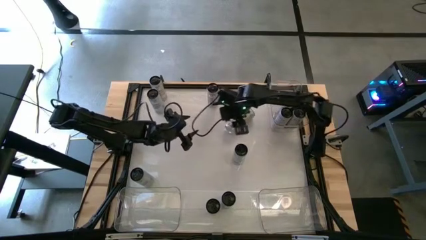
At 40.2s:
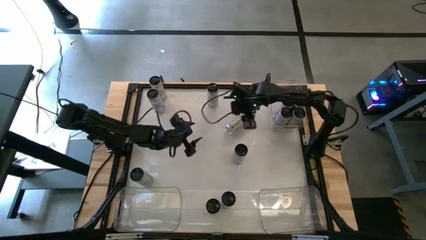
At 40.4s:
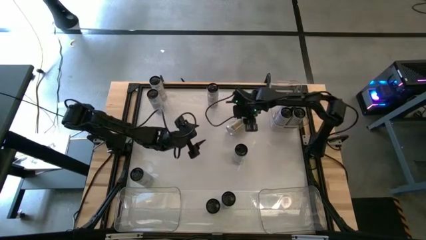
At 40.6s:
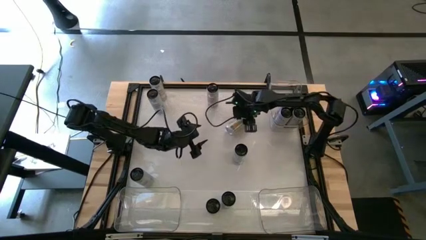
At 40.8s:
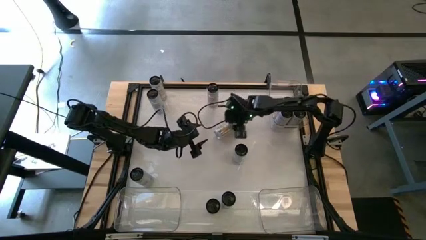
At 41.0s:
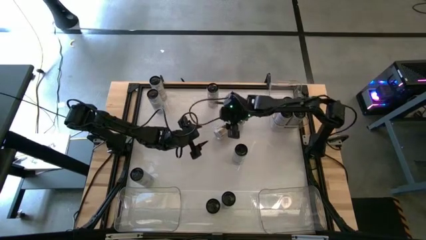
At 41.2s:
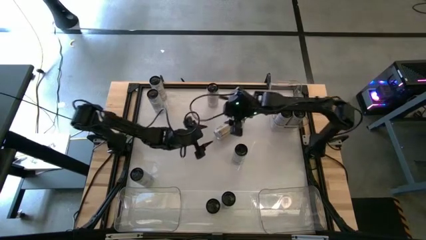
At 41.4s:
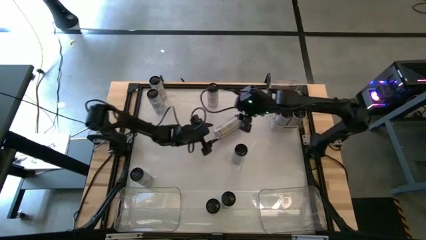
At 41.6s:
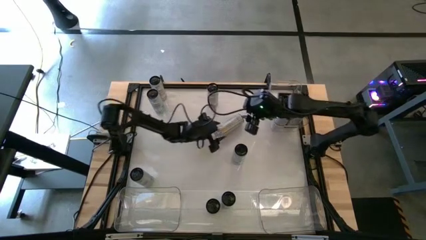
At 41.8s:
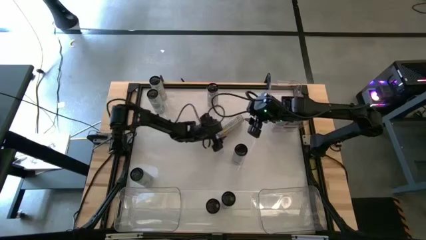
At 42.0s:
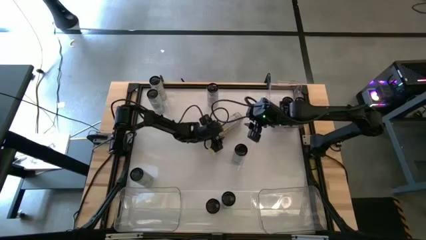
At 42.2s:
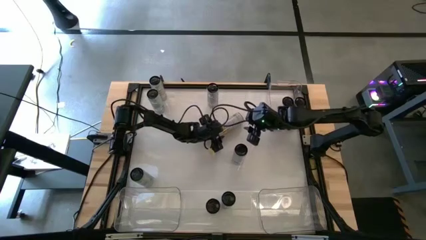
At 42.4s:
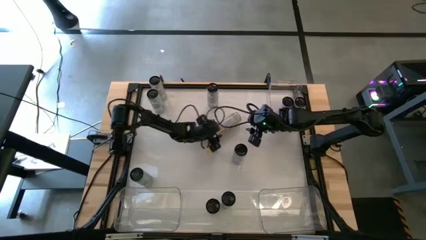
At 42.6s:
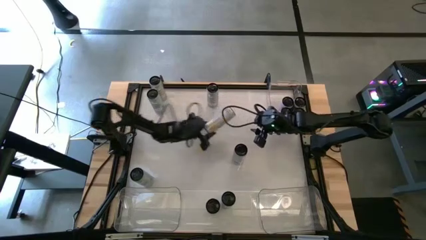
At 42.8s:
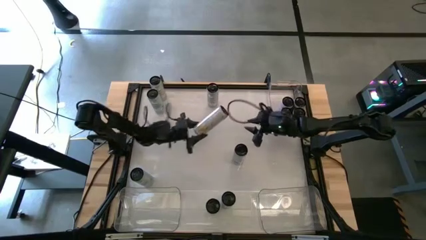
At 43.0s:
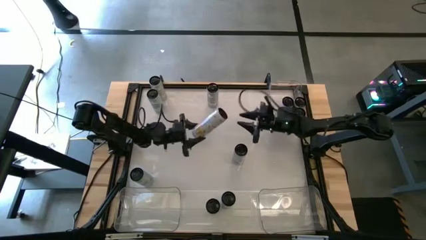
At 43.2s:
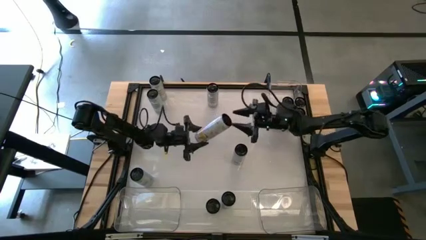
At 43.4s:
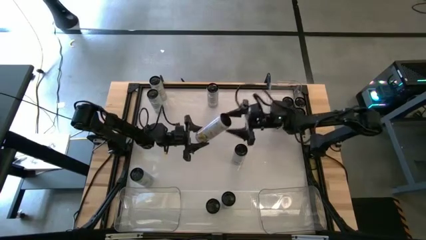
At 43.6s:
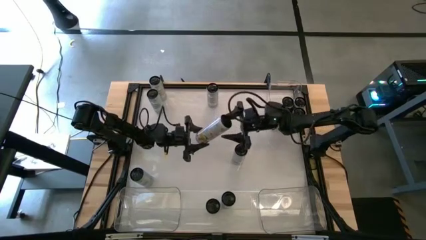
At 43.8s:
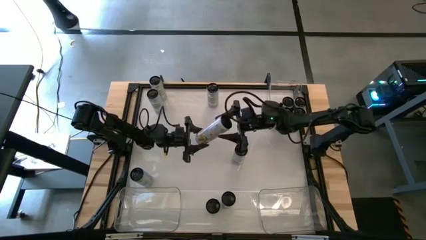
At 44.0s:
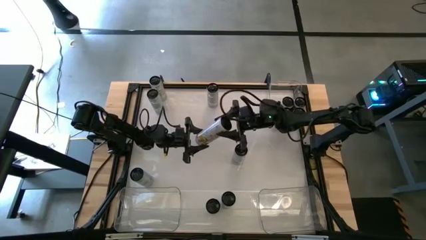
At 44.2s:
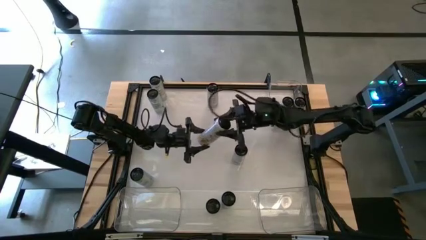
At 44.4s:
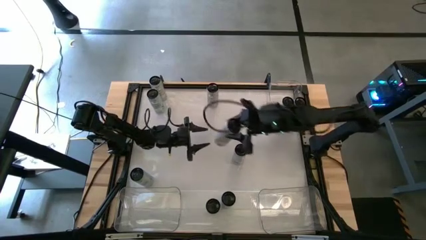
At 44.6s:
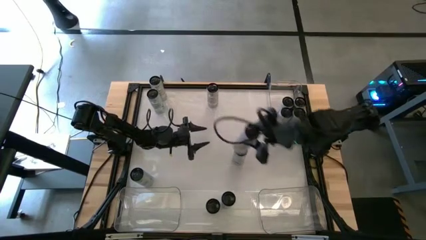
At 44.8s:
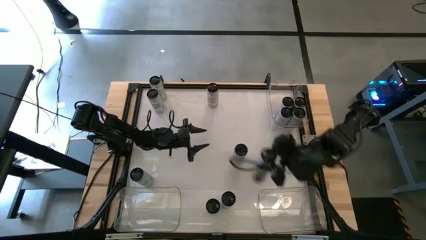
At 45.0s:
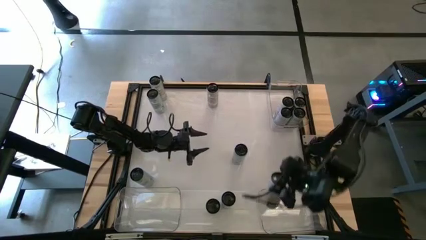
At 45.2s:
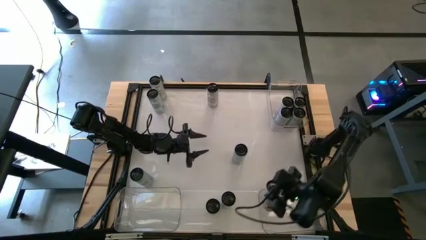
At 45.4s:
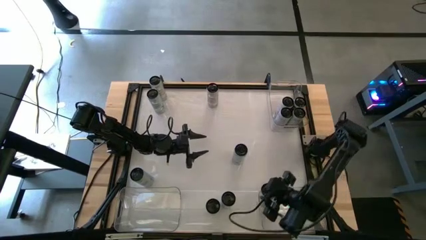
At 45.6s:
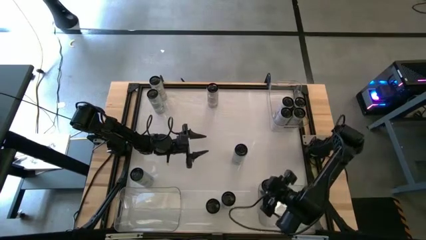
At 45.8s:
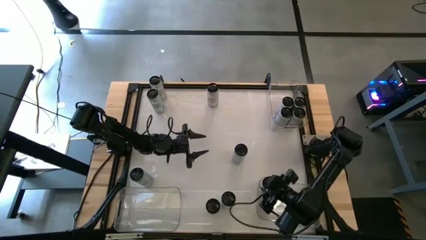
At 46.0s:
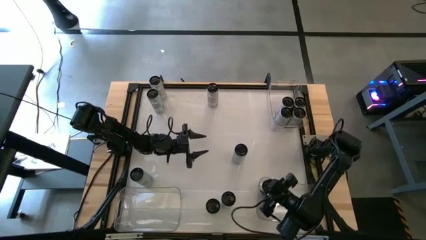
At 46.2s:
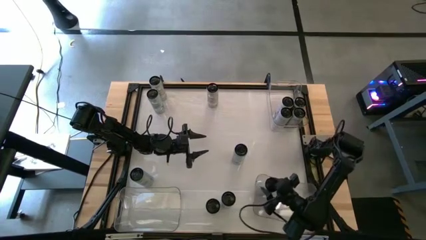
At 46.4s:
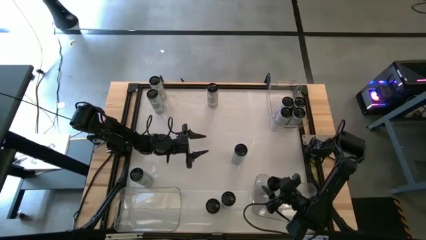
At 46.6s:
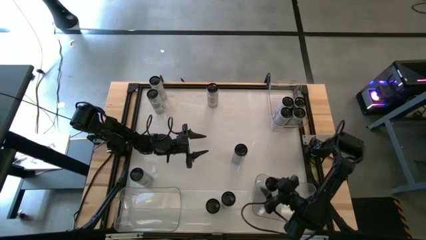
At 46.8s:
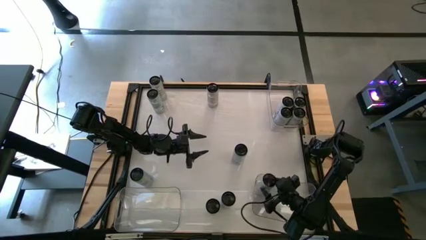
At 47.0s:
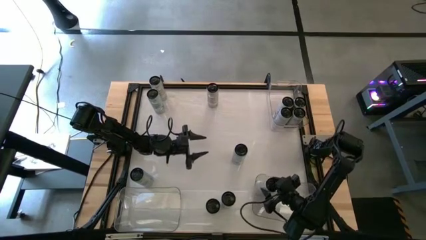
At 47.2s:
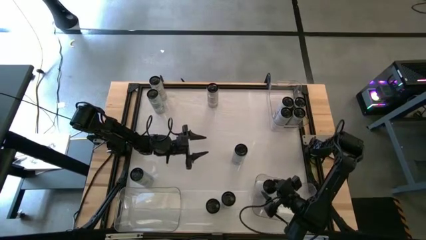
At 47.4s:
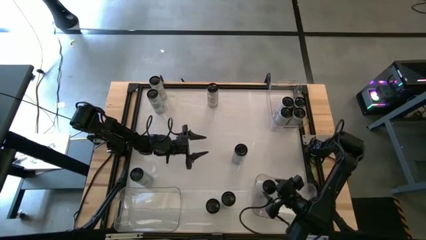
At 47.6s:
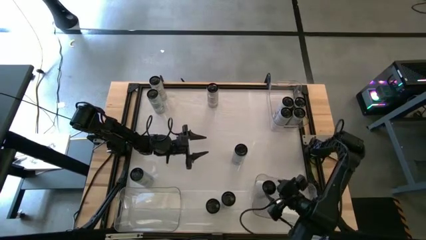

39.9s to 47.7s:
Task: Sort soda cans
Put the top right white-yellow soda can into the bottom right transparent bin

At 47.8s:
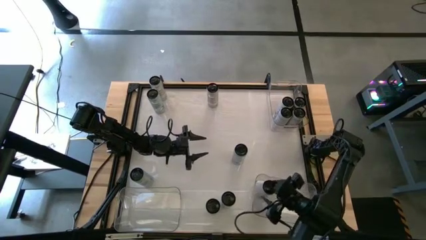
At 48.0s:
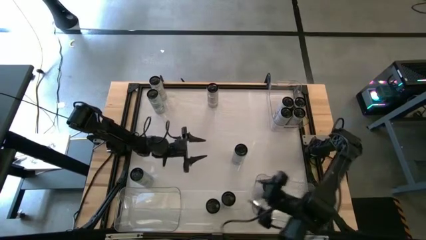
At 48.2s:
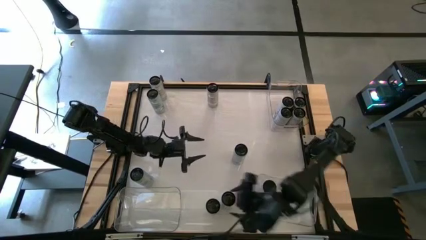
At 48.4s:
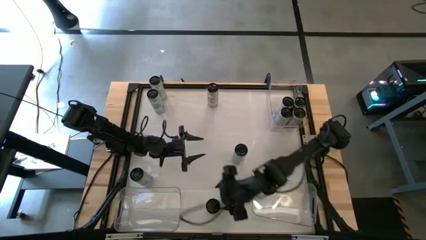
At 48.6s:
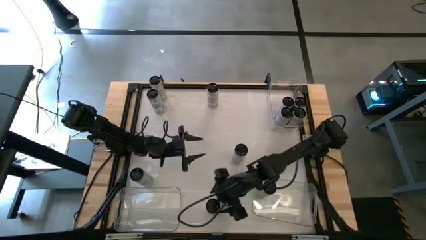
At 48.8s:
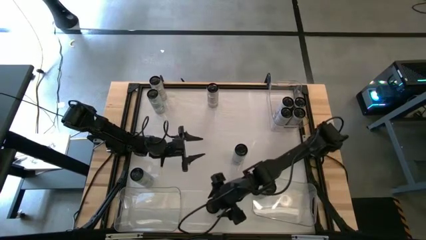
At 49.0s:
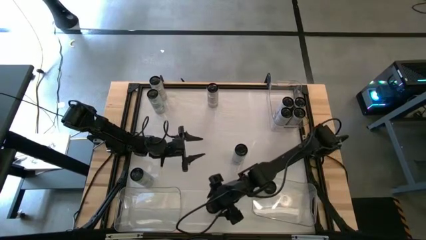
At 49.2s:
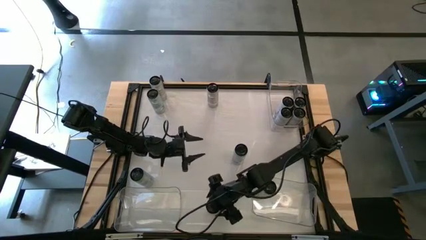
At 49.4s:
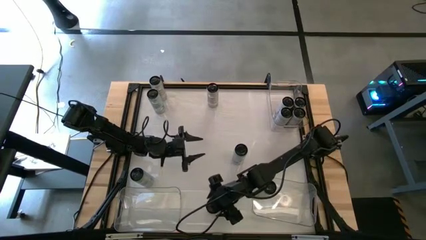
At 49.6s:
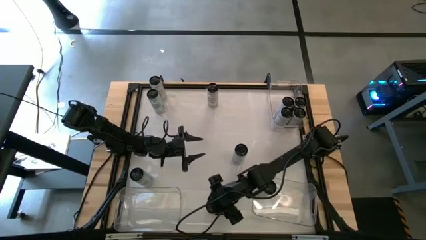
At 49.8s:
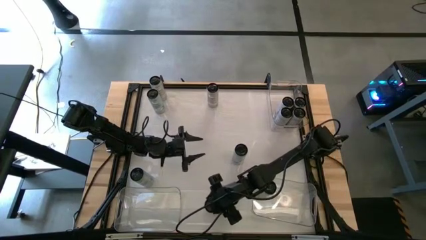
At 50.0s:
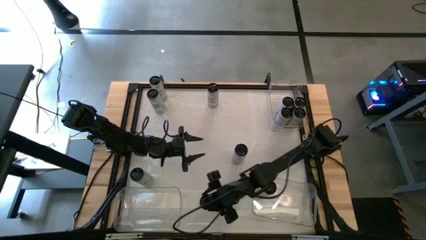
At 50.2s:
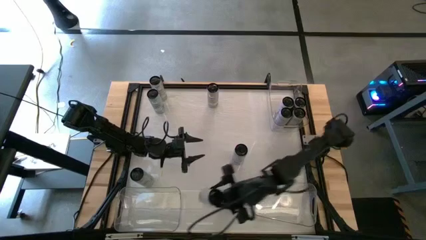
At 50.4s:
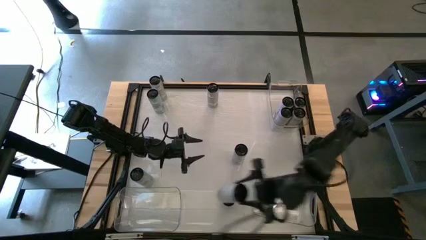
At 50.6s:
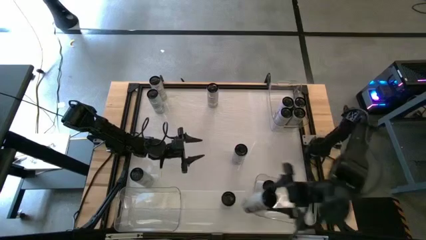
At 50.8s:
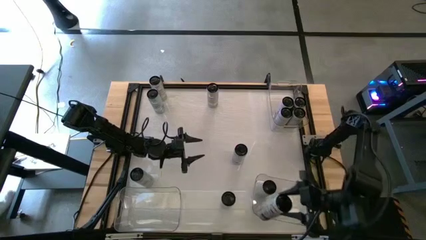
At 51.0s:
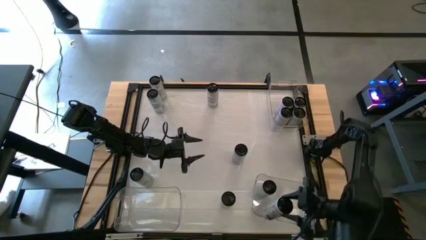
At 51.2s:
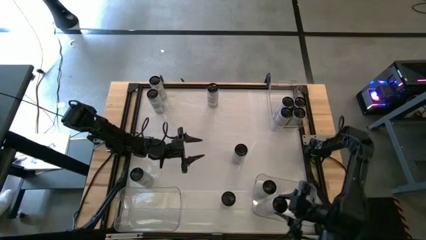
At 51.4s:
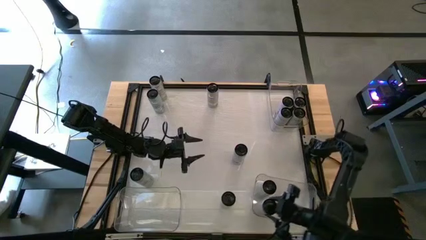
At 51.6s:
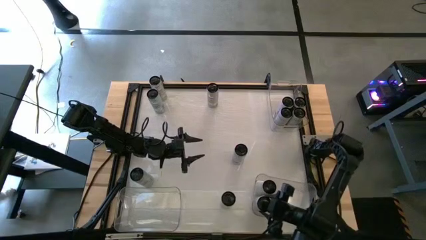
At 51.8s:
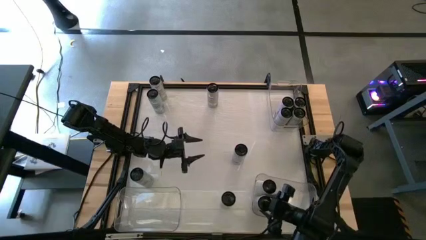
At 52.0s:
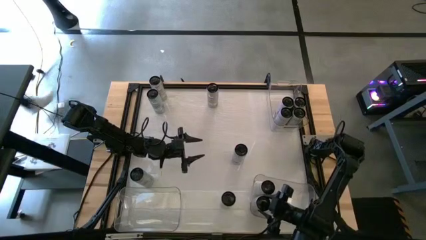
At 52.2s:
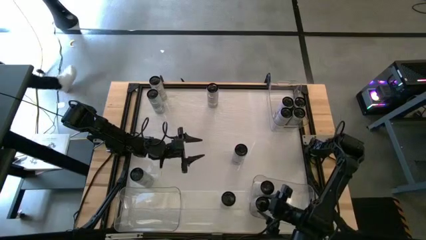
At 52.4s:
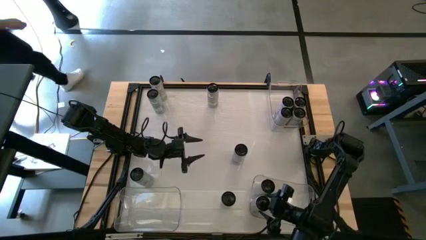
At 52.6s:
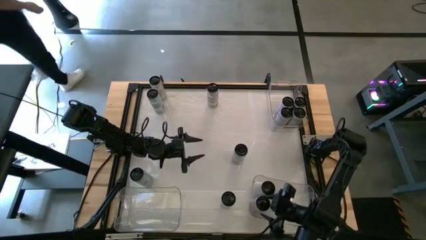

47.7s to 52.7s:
Put the bottom white-yellow soda can into the bottom right transparent bin
